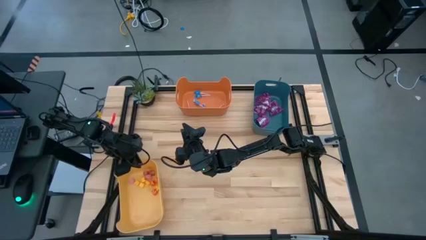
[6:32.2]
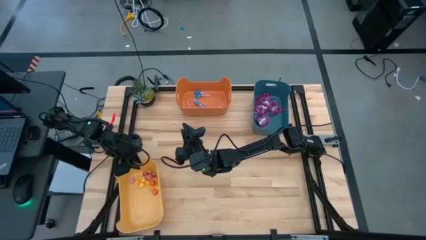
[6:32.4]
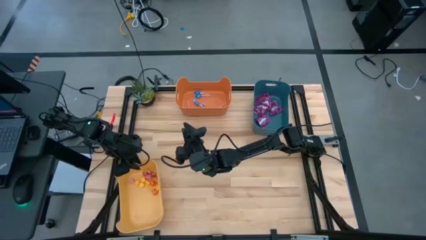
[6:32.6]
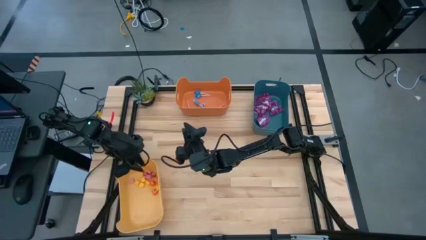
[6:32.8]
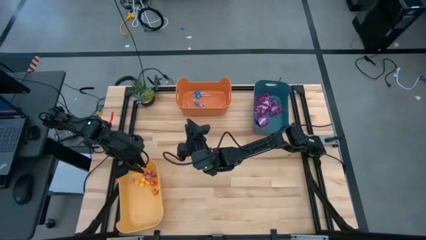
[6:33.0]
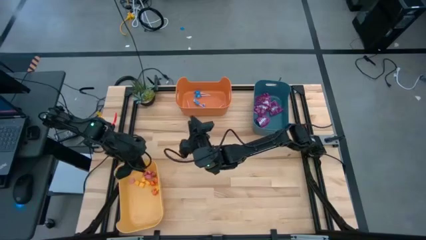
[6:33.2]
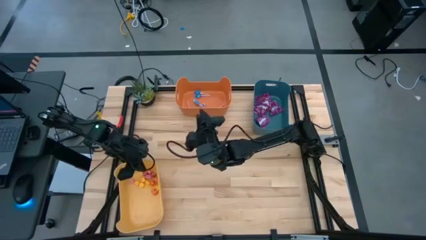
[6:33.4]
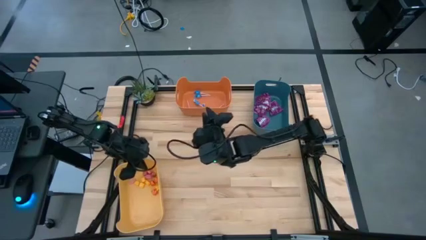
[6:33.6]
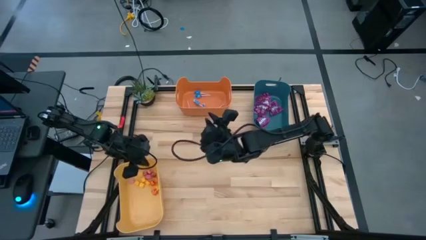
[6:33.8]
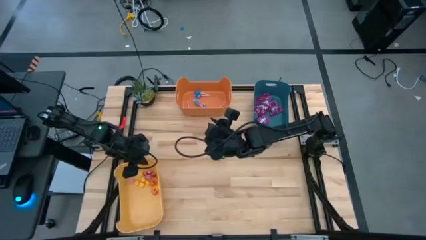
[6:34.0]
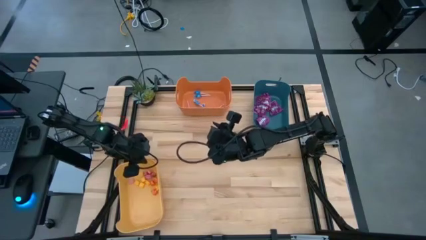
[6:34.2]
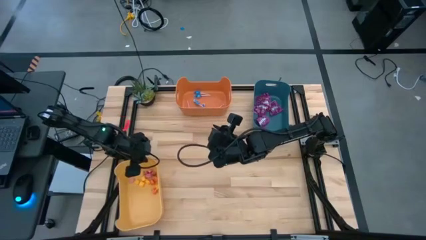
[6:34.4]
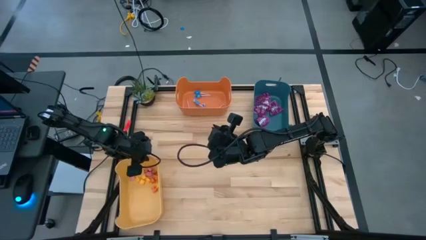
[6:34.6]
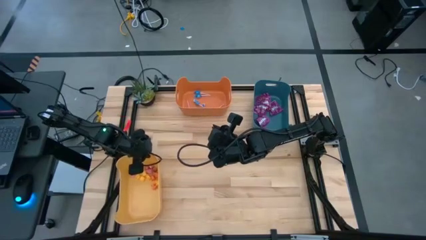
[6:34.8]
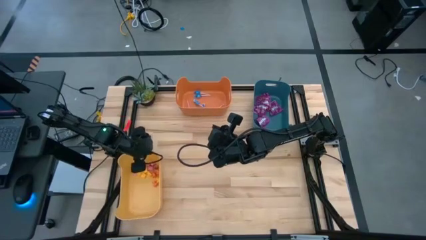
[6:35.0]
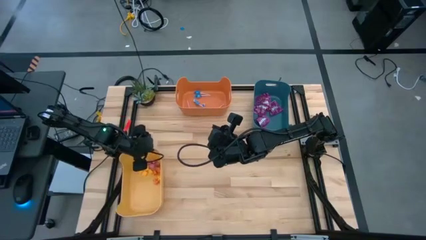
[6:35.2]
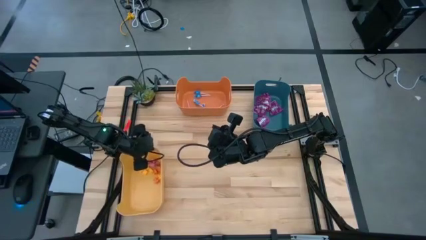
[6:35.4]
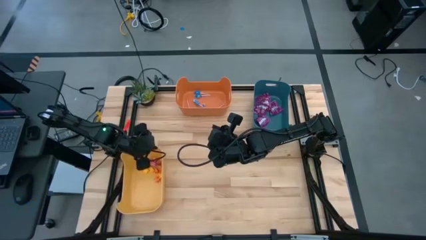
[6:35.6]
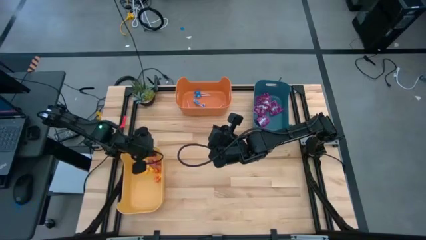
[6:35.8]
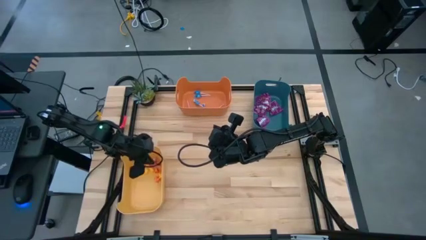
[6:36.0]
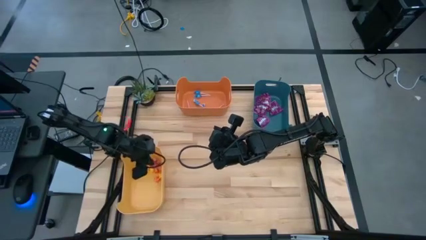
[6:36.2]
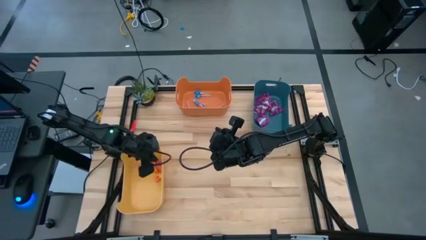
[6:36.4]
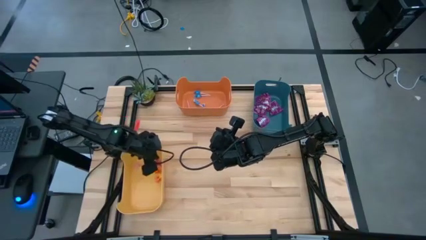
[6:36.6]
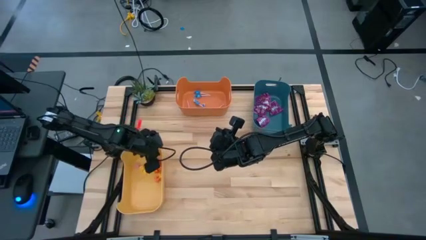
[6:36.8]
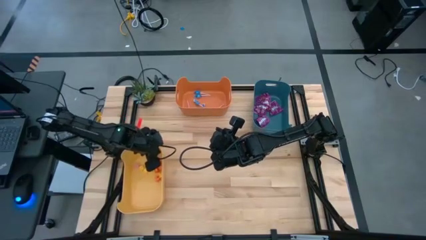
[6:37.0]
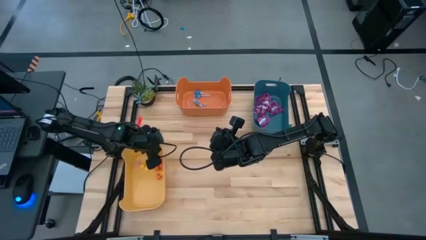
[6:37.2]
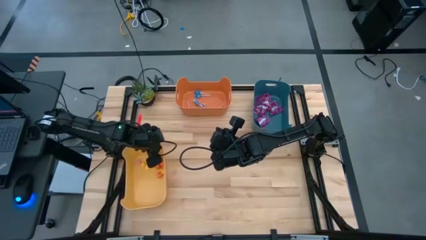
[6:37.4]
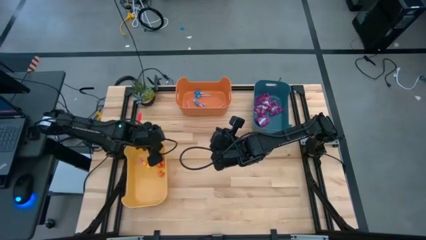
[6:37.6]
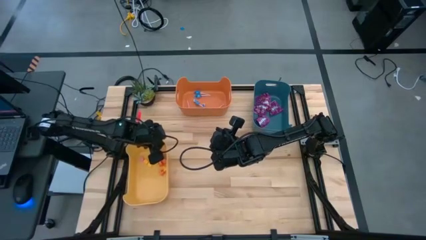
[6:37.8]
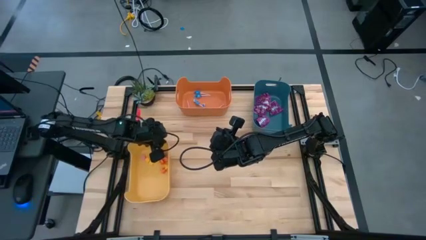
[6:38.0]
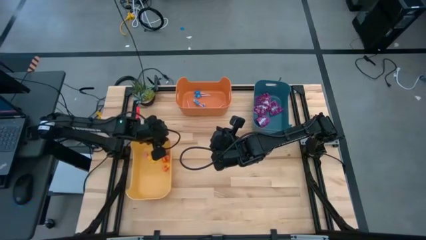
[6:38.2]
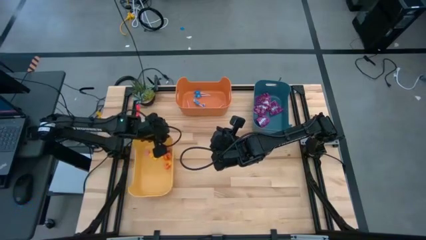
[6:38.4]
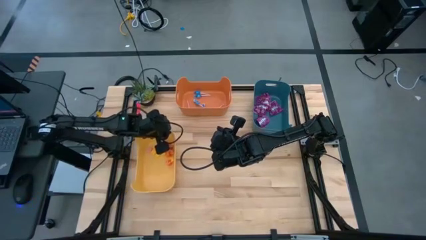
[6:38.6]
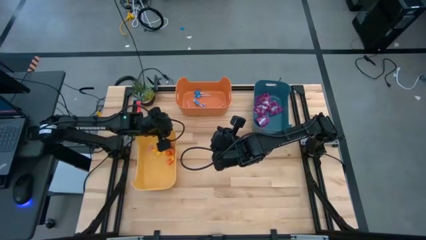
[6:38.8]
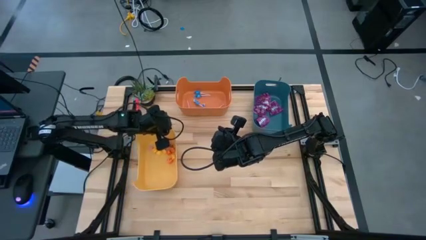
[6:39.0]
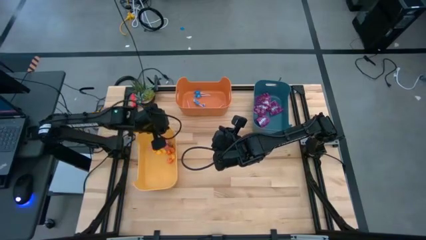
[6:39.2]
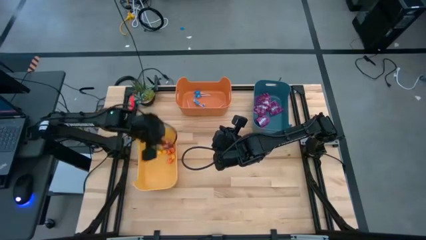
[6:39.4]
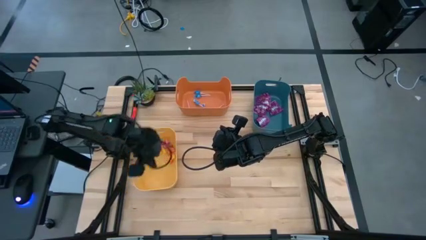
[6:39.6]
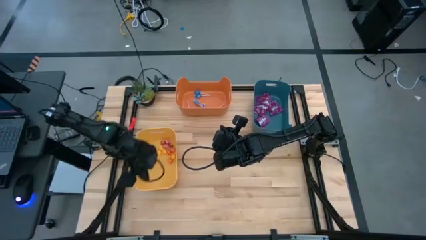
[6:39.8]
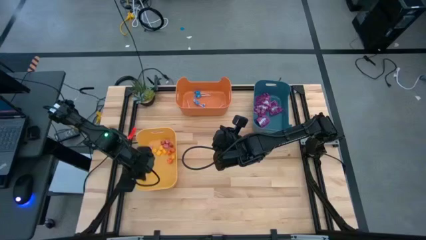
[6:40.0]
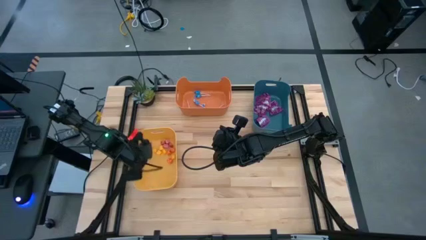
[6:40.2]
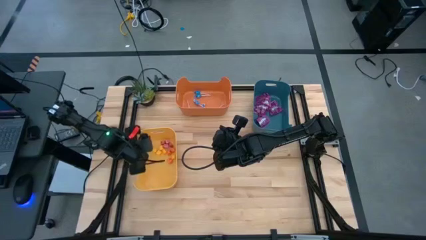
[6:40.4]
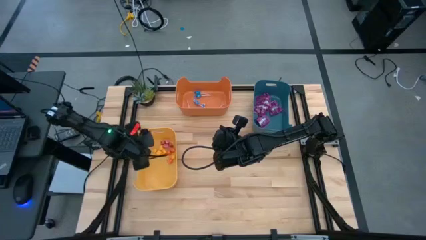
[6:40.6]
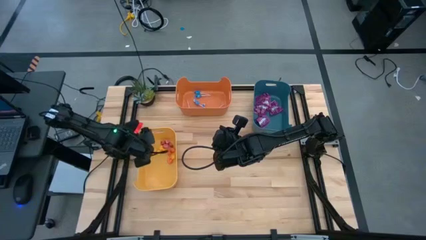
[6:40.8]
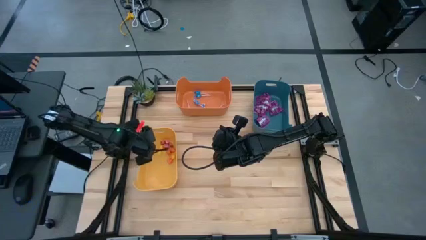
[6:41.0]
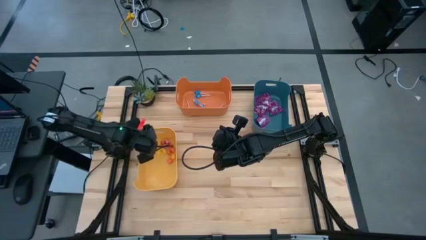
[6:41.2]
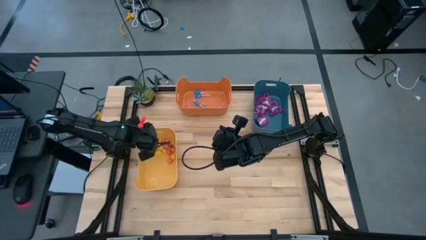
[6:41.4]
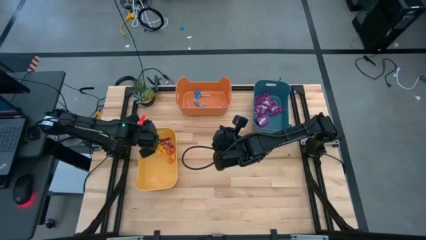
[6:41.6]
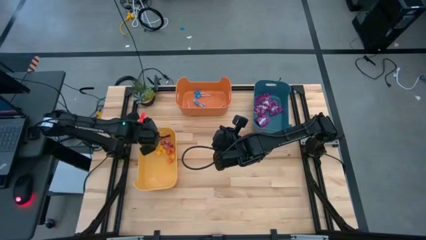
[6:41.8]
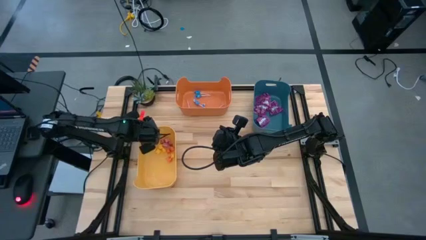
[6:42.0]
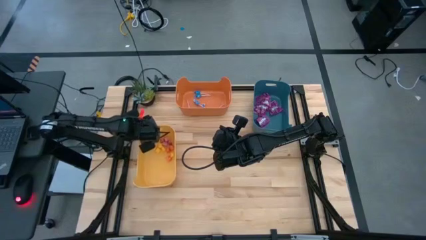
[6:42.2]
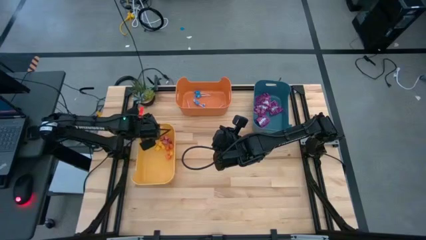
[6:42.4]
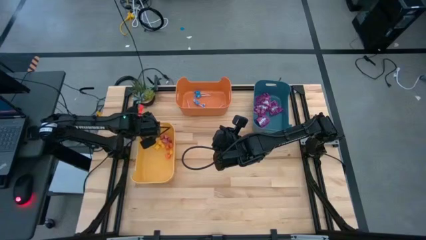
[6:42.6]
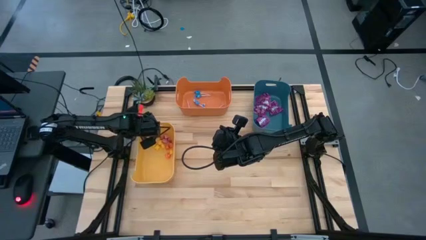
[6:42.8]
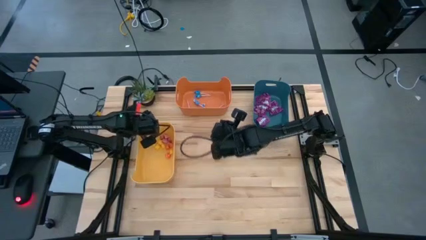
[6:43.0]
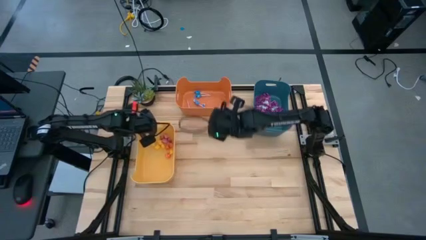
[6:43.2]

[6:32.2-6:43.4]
Task: Sort candy
Move the orange bin to the left center

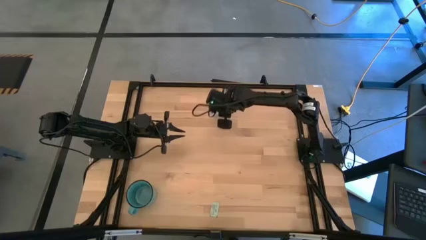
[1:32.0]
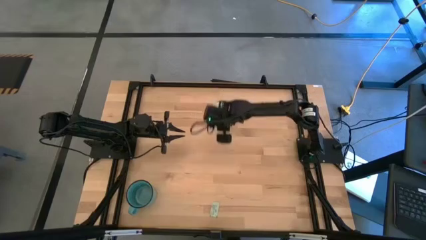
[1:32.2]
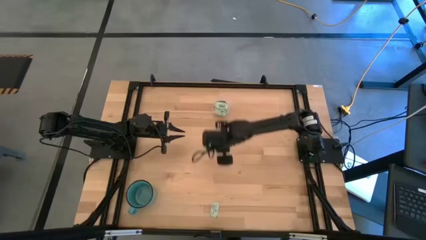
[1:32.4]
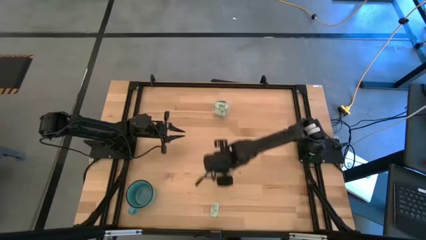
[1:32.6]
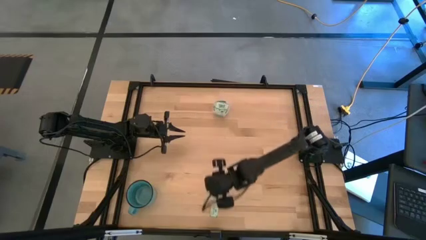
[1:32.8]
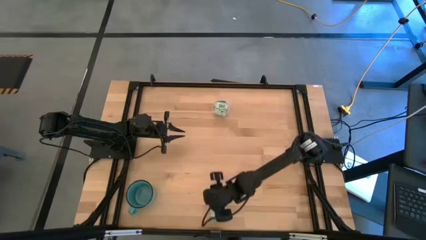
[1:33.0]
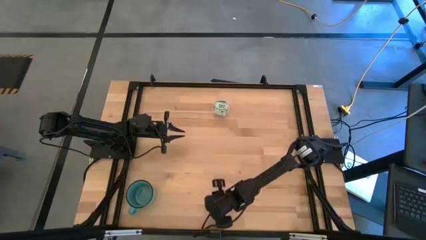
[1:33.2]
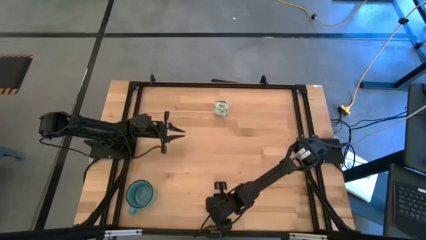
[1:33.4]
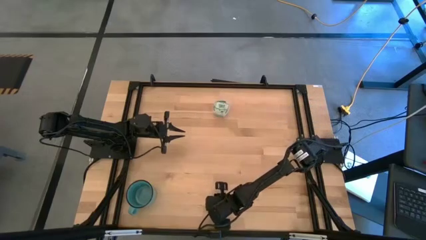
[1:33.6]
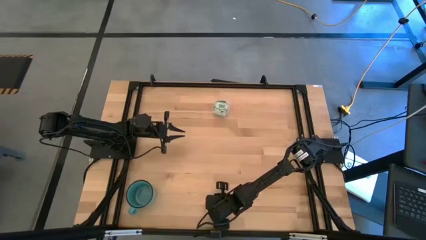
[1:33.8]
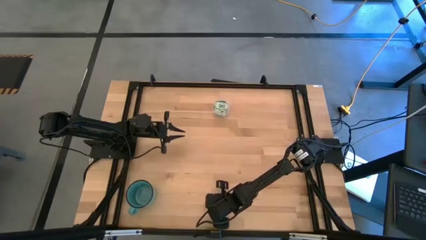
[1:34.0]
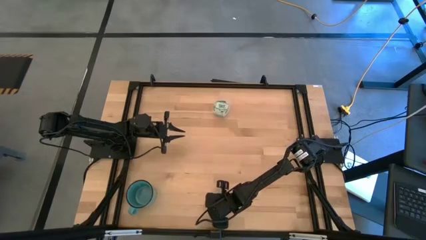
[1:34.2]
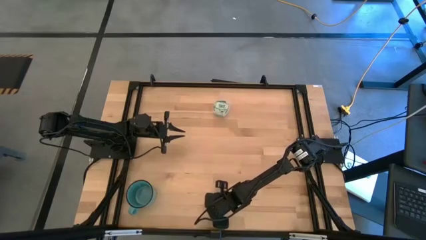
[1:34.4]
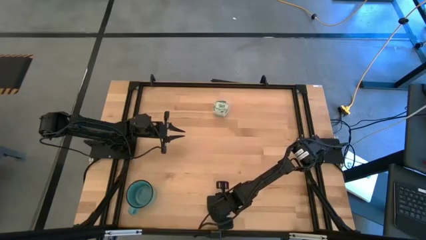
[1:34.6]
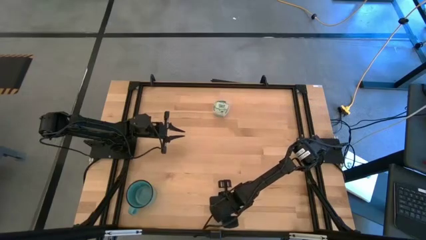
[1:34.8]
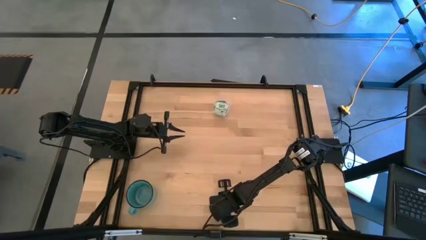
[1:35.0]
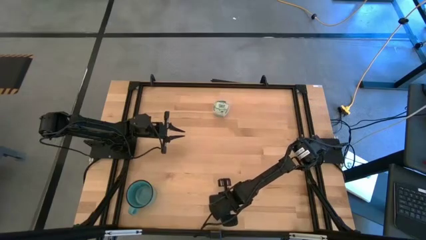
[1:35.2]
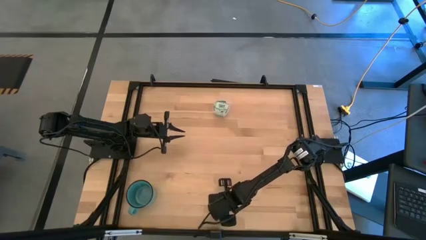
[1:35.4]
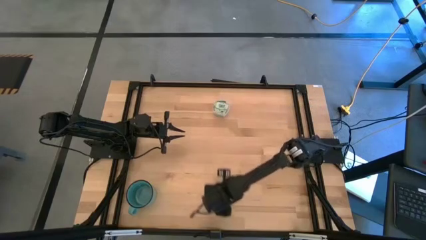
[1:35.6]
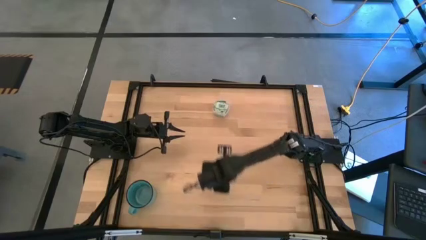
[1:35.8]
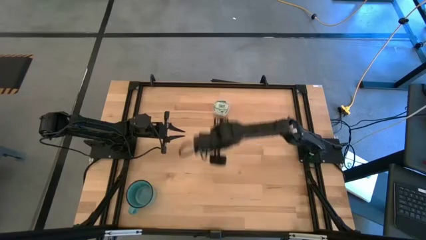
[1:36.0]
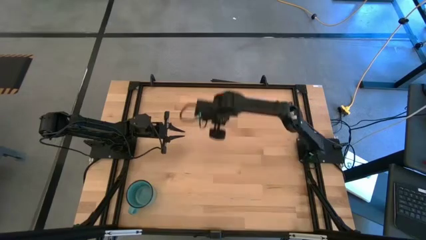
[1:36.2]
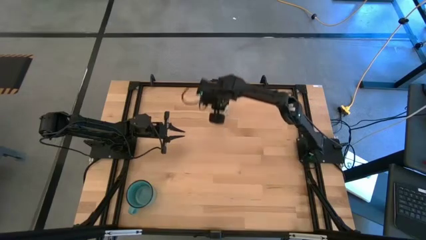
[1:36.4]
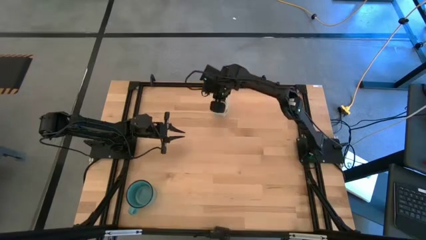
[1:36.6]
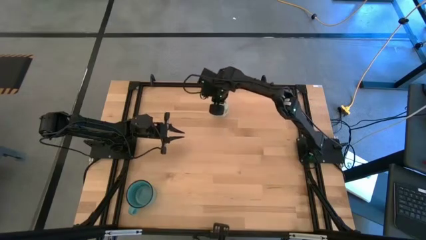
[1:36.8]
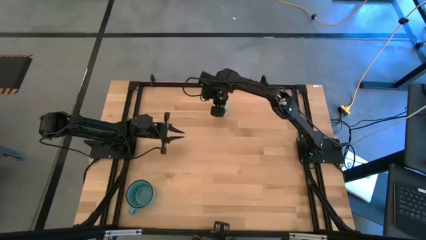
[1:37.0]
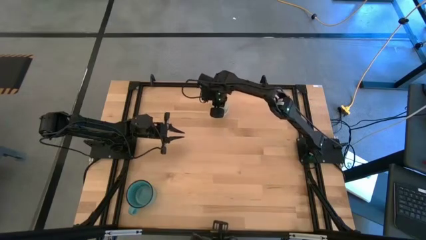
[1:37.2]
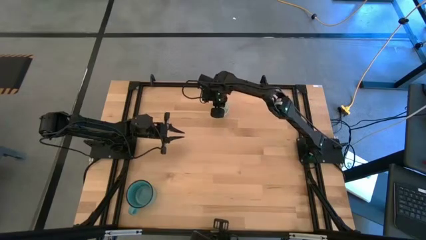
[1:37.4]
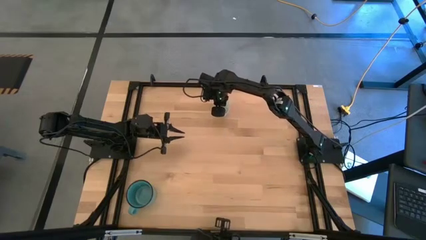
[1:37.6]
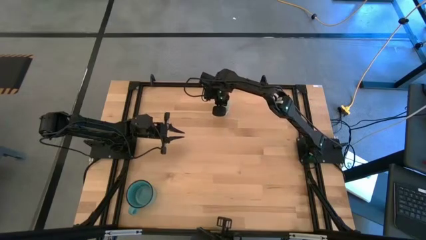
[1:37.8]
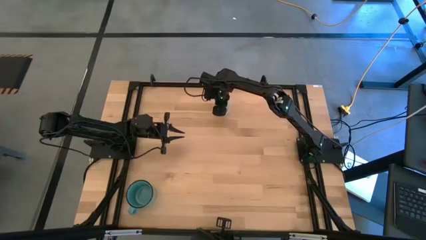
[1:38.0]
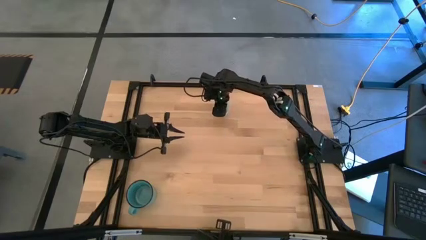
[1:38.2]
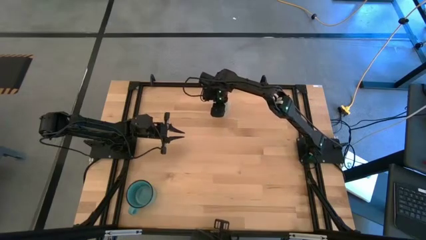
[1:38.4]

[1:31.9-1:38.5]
Task: Pick and place items into bin
Put the light green stevia packet into the transparent bin
